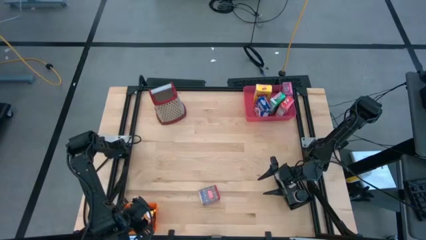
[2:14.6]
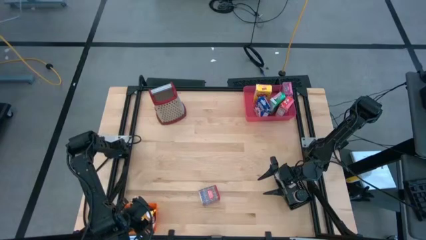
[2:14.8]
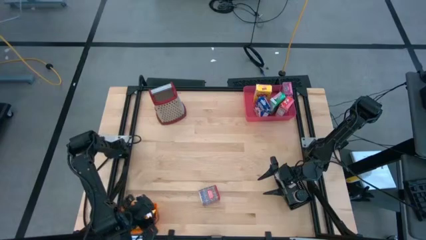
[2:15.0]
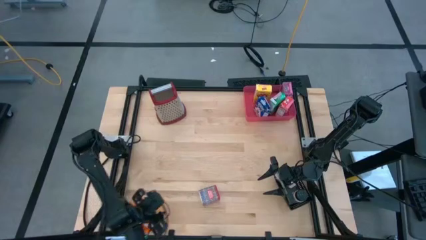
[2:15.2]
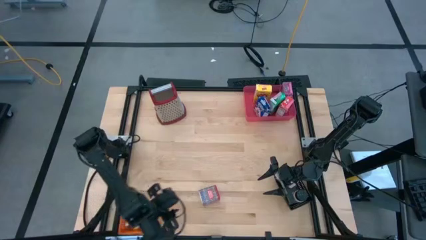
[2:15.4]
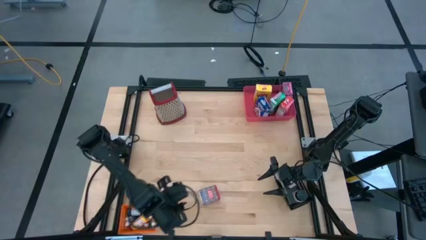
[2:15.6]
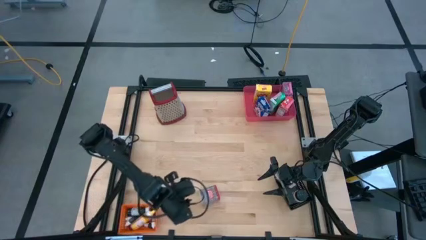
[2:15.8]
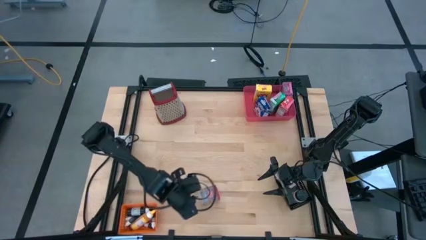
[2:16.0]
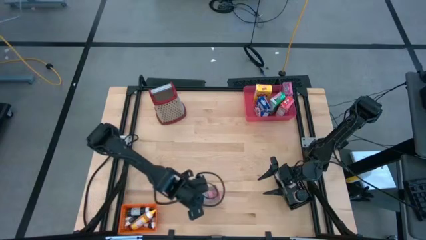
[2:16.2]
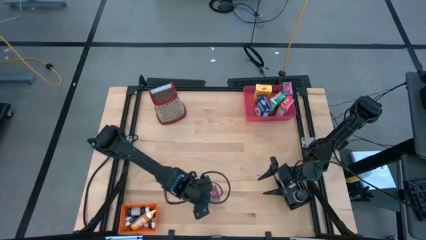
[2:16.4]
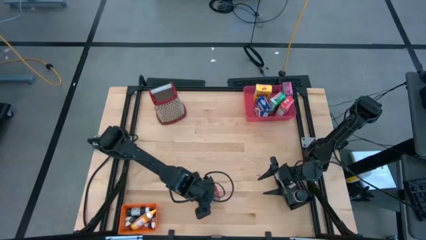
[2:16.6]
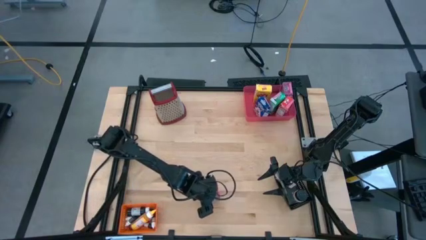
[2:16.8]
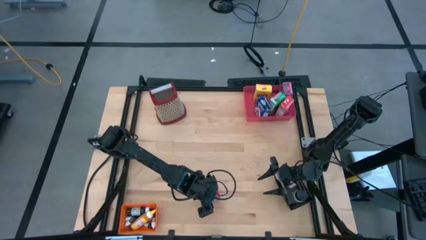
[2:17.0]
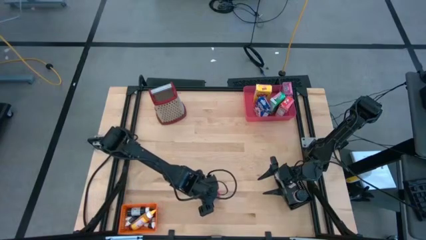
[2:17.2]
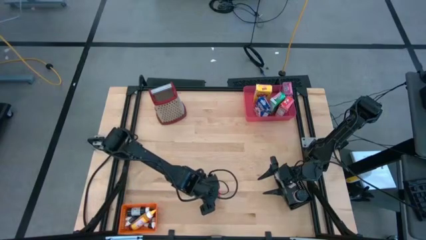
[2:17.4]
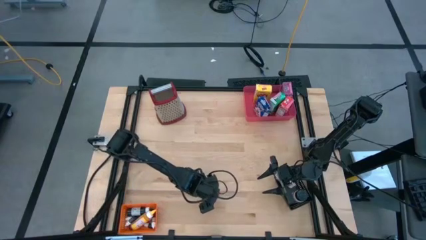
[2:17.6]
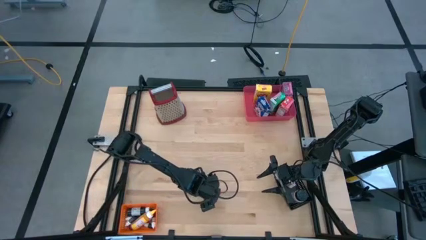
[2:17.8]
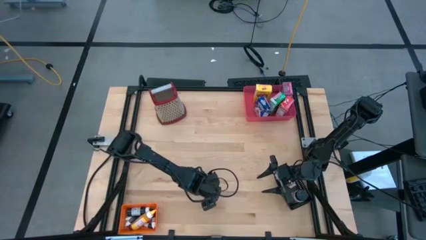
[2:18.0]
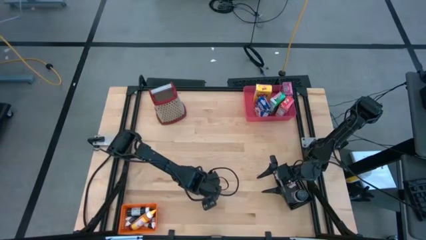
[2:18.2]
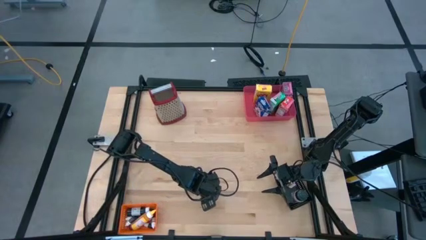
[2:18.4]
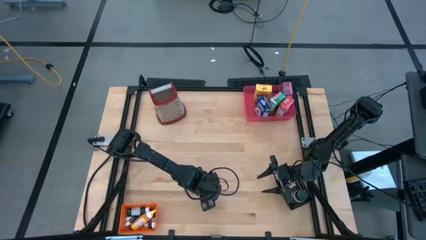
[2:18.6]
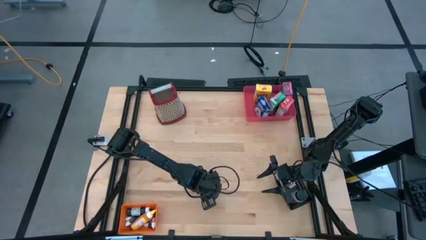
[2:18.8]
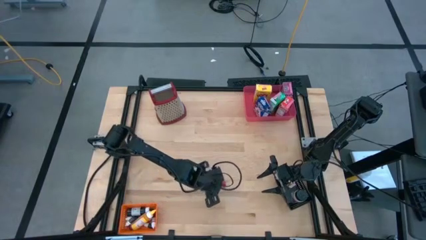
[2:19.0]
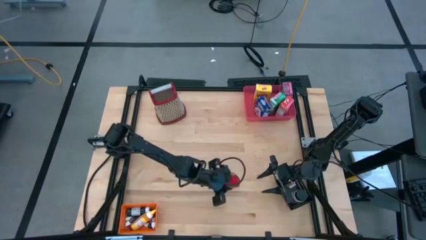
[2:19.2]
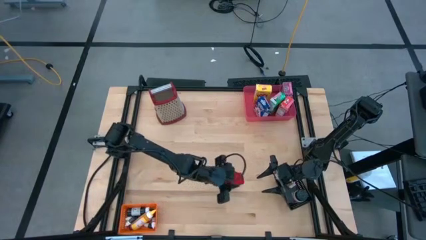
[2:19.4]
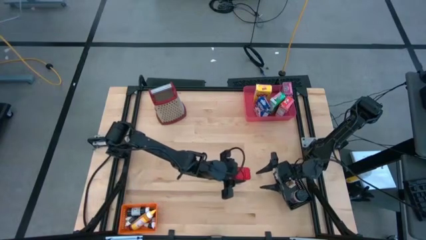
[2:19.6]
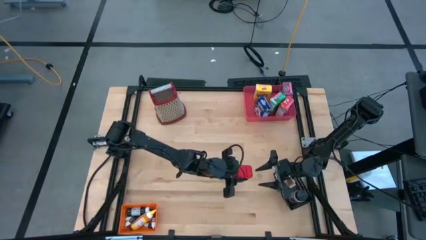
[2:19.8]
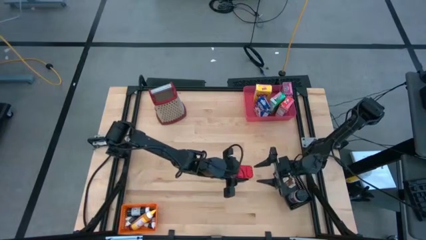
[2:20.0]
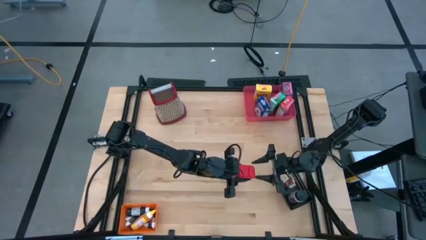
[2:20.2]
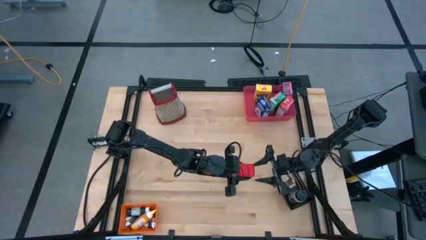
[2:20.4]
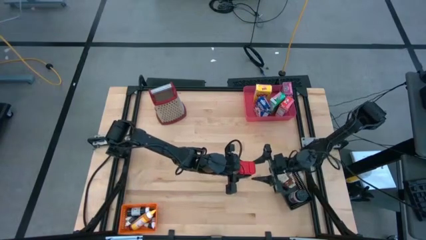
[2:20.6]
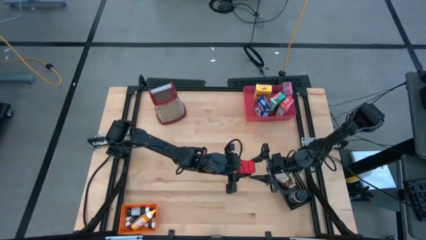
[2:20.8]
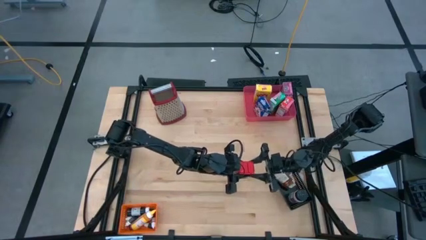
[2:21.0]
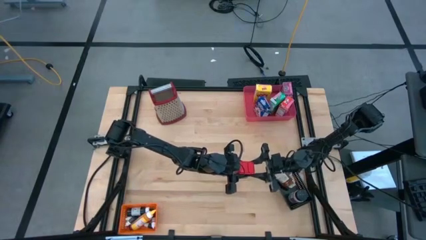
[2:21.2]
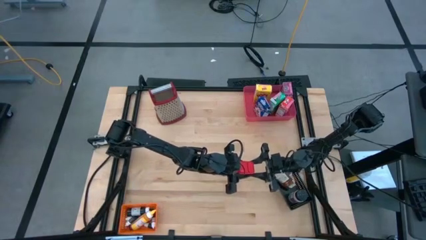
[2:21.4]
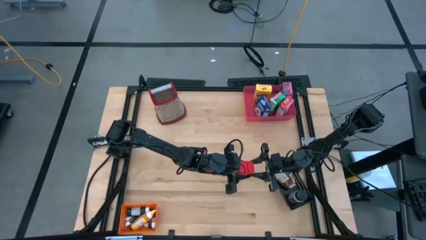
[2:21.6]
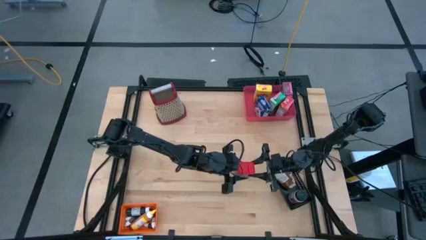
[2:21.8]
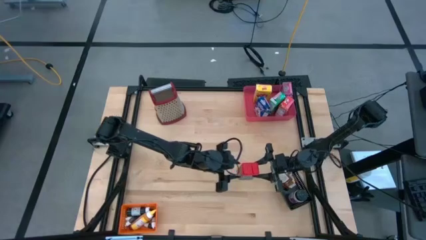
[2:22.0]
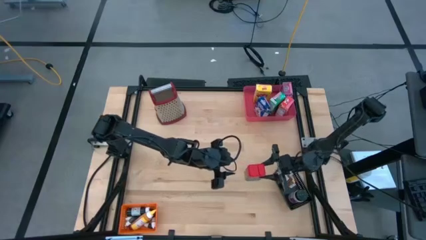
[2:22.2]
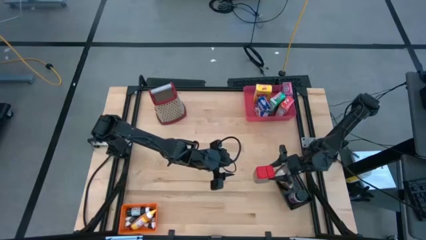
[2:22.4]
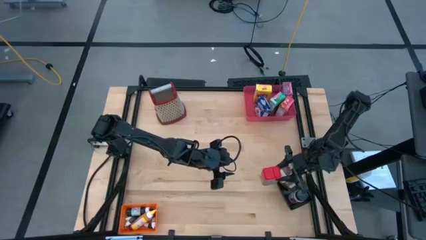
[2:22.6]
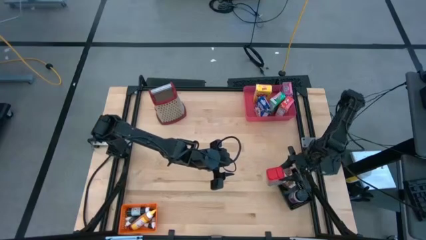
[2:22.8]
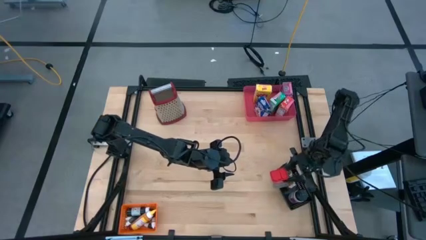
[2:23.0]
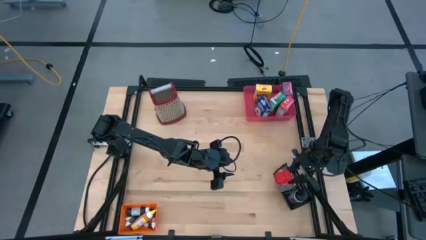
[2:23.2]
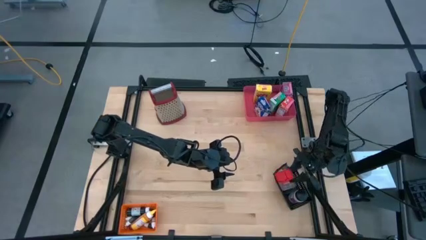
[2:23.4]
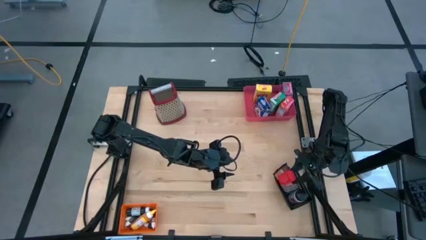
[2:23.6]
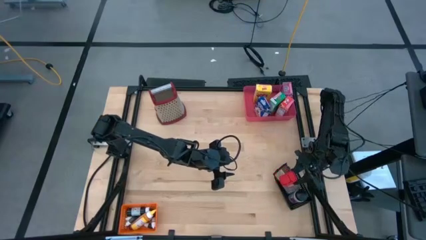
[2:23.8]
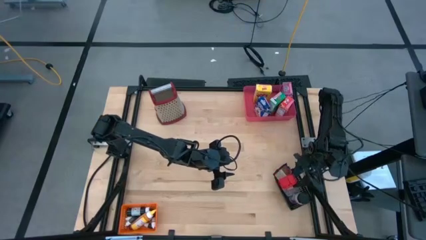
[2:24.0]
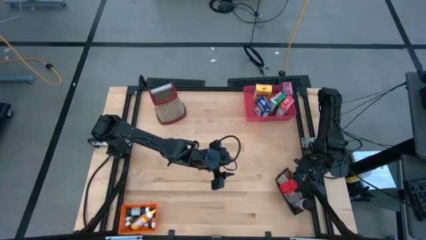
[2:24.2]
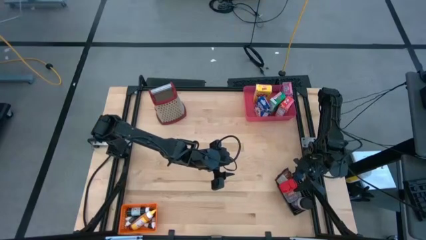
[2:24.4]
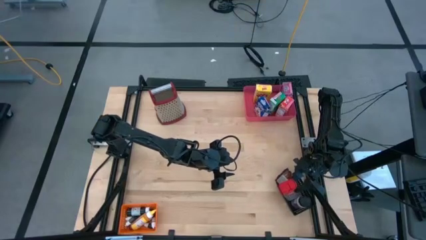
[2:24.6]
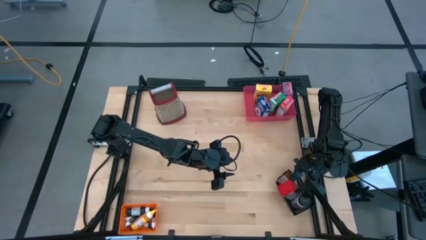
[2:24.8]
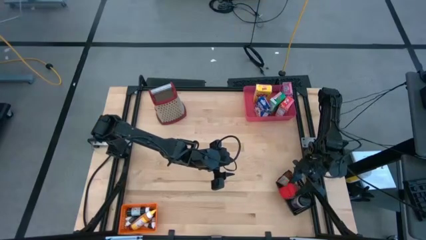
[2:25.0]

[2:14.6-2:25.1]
Task: Pick & Place Kitchen Items
Put the red seasoning into the black bin

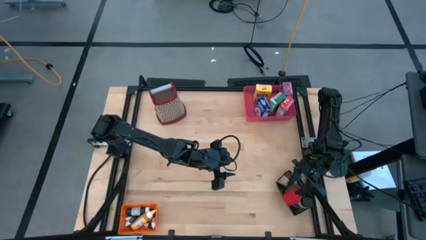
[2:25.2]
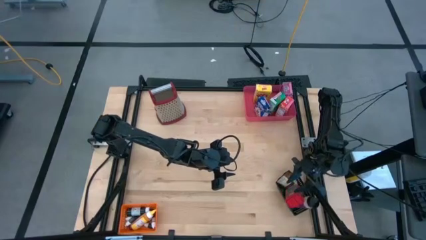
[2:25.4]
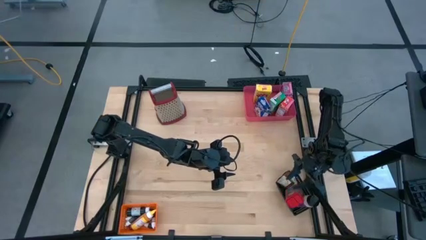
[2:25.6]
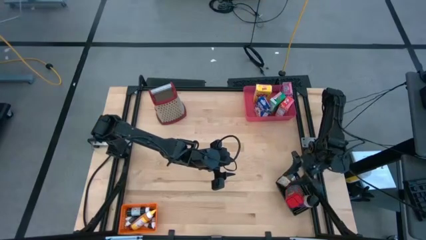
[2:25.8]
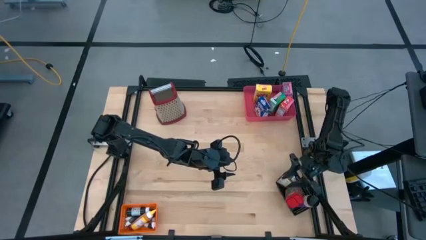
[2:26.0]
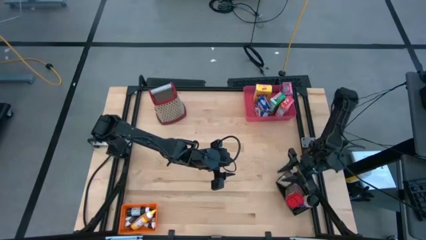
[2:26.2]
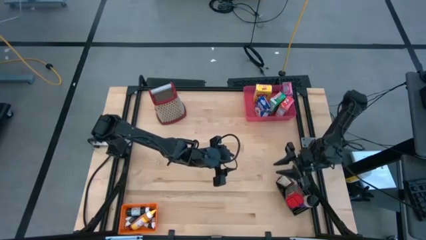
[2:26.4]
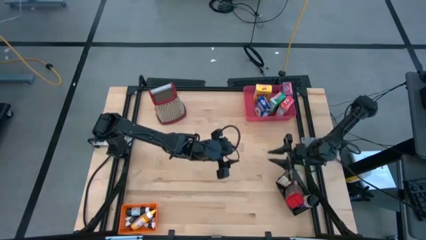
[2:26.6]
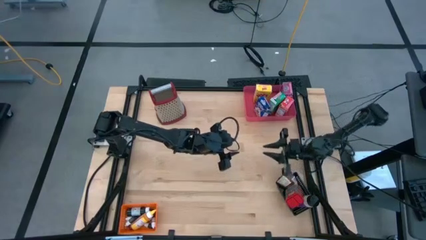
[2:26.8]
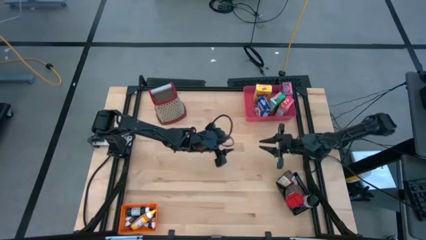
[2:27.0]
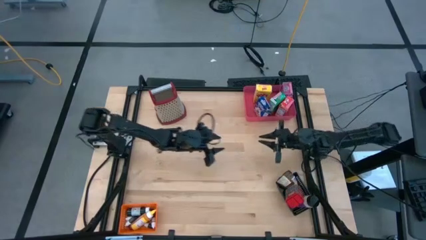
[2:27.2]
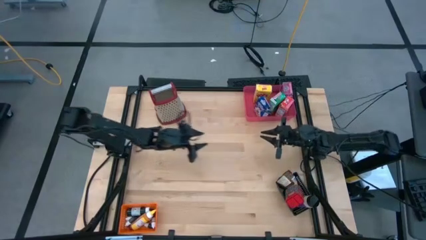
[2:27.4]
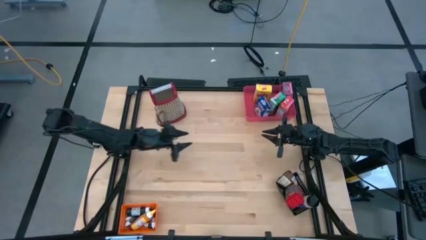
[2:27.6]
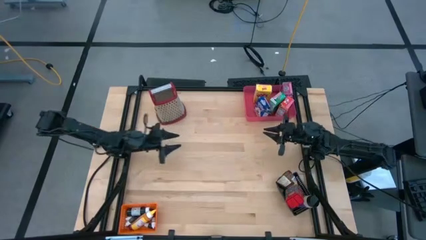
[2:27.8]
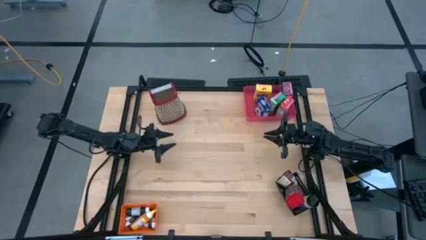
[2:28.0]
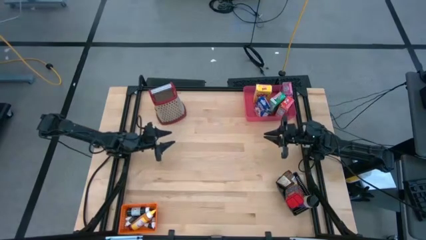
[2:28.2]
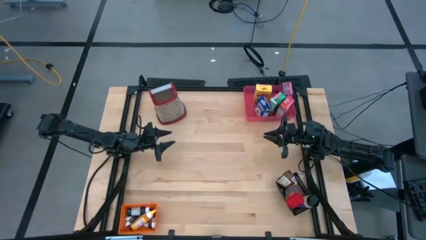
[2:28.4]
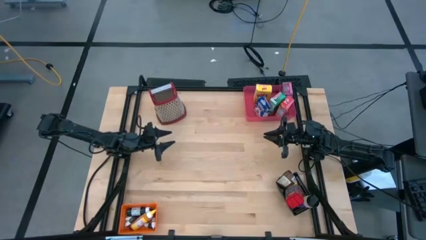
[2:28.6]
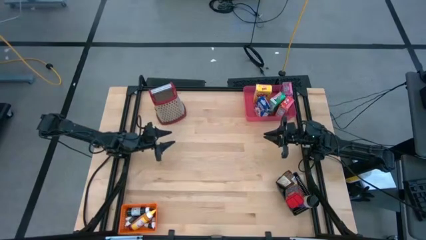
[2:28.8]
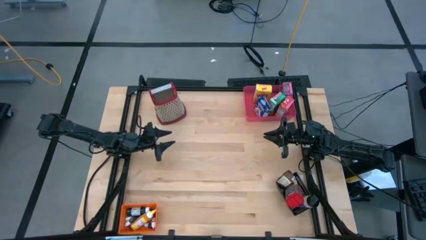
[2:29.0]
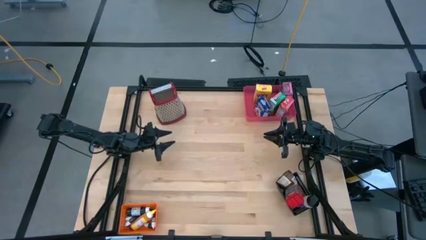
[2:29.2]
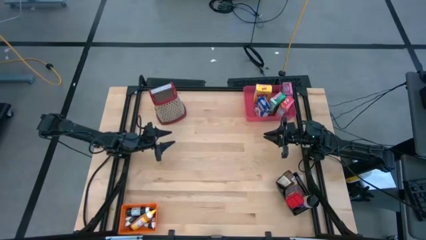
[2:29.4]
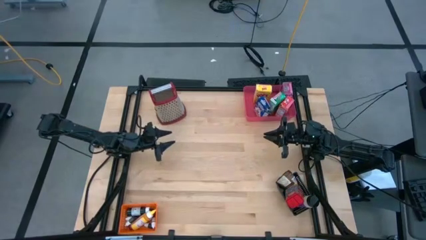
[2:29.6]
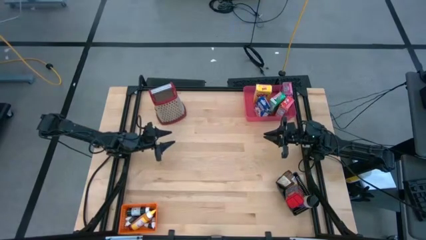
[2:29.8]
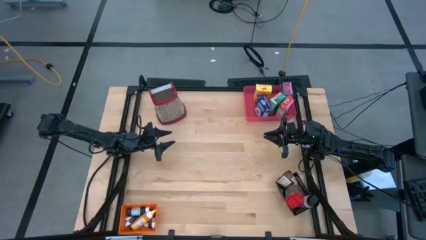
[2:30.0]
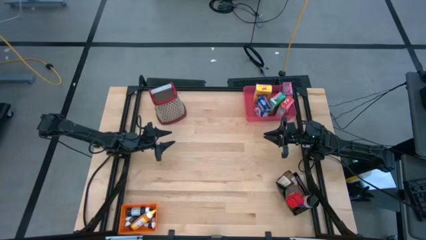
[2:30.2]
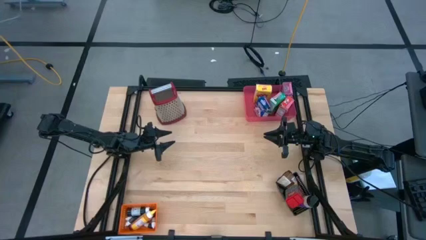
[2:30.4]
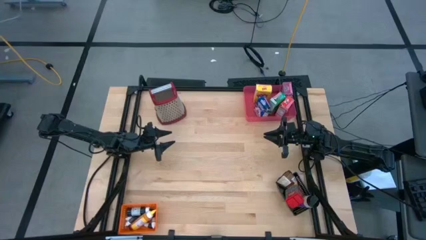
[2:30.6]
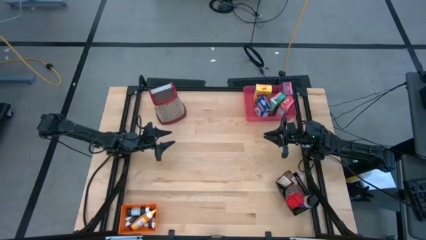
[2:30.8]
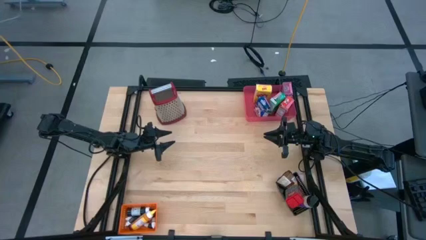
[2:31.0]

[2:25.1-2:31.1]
Return to Home Position
